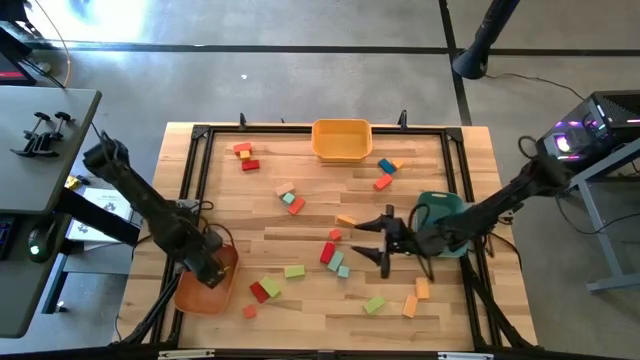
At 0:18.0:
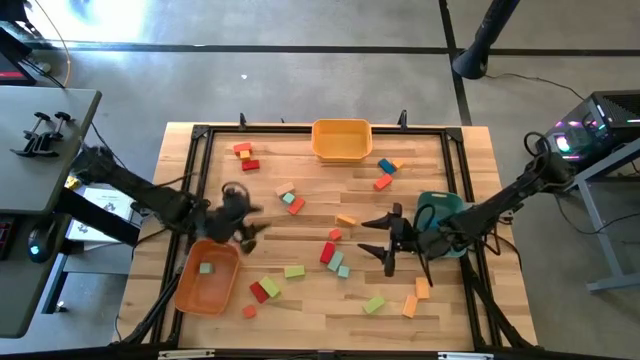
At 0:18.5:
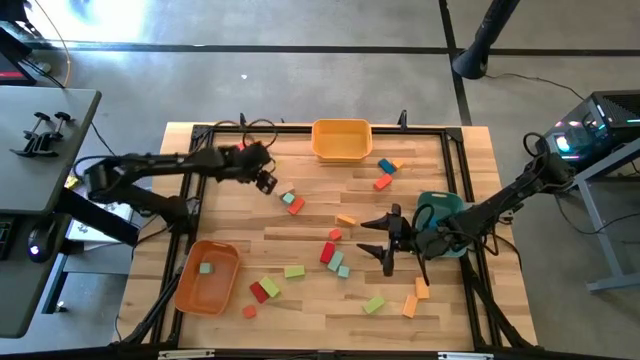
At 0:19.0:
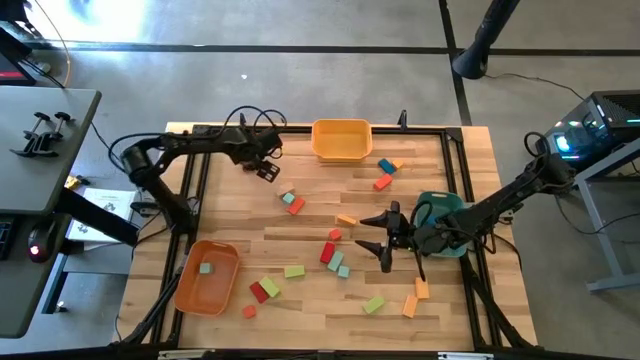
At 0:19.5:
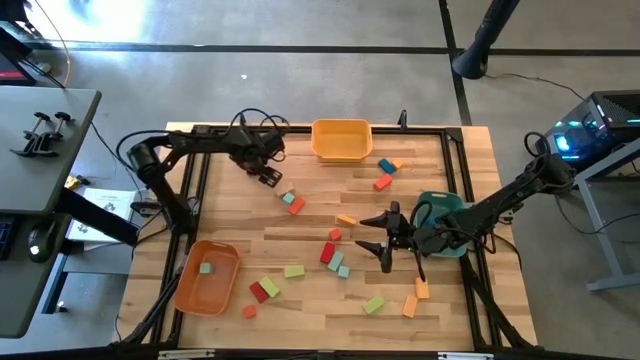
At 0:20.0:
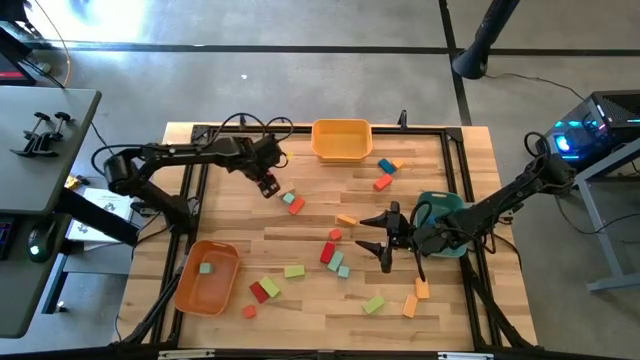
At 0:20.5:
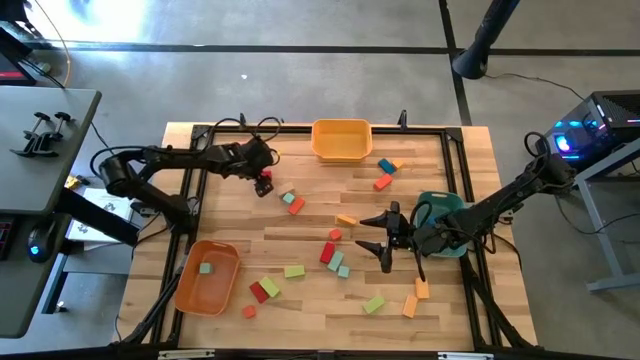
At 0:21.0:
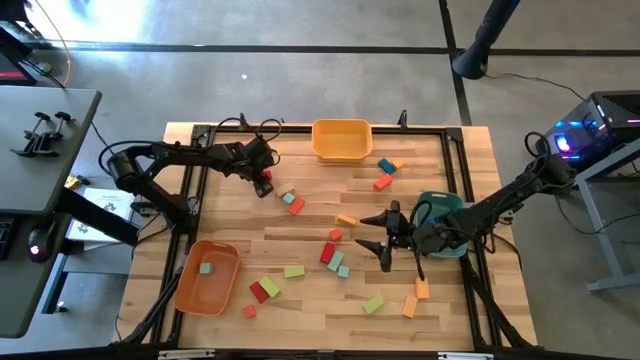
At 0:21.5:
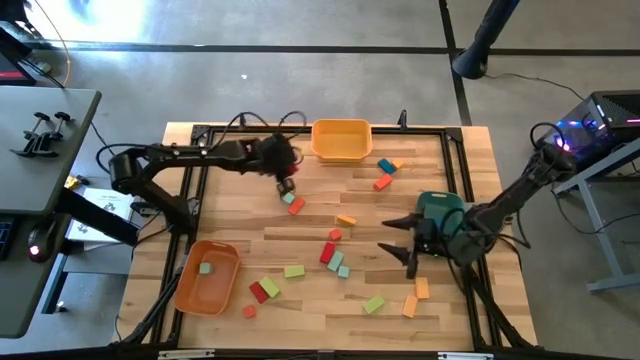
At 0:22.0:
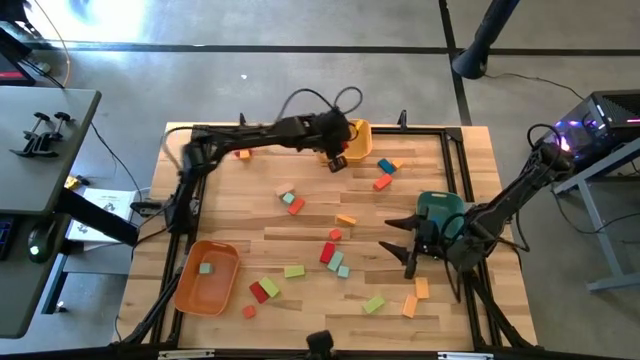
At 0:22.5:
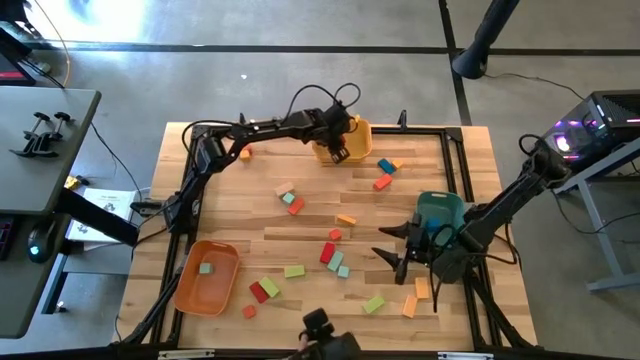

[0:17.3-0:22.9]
Task: Sort blocks by size
Put the red thin rectangular block into the yellow bin

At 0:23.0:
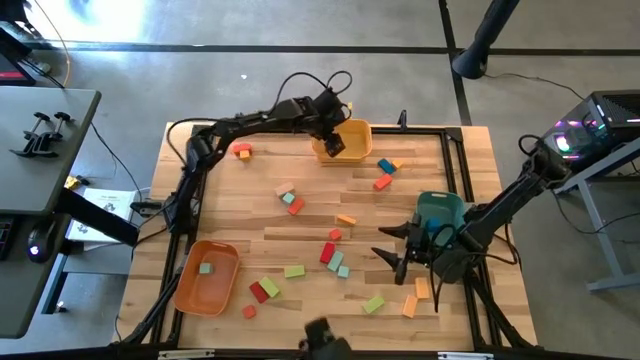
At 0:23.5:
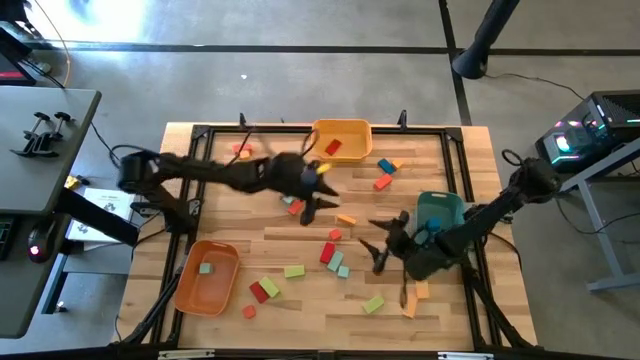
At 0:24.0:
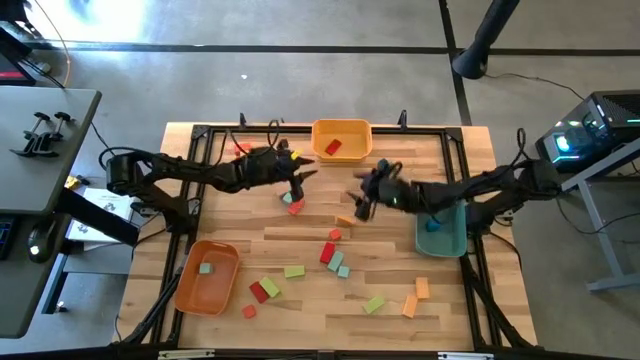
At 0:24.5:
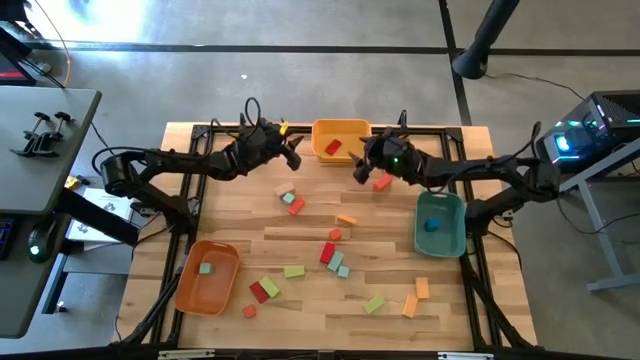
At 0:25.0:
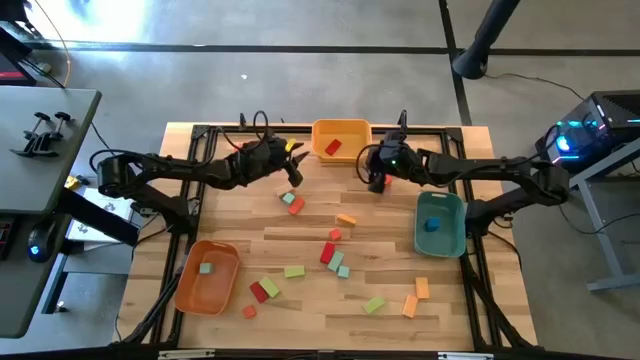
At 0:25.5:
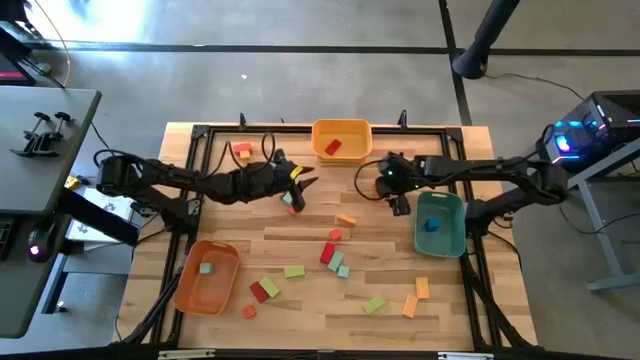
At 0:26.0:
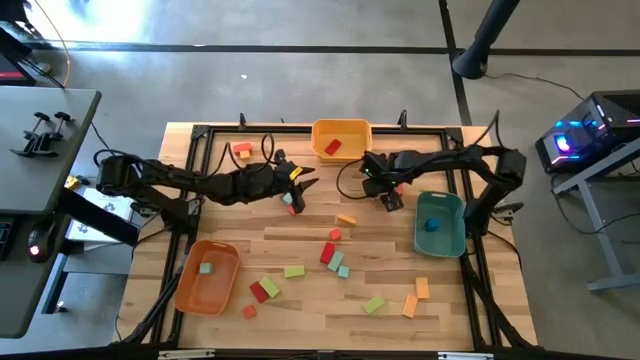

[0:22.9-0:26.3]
Put the thick orange rectangular block into the blue bin

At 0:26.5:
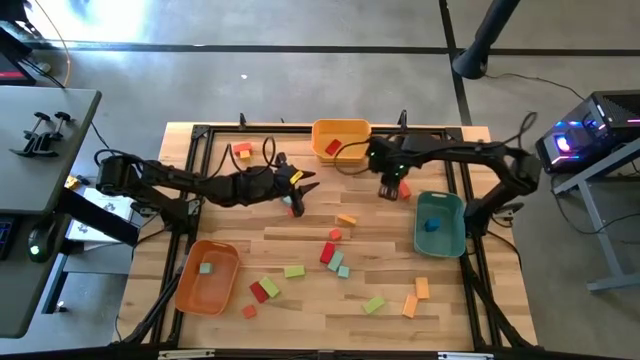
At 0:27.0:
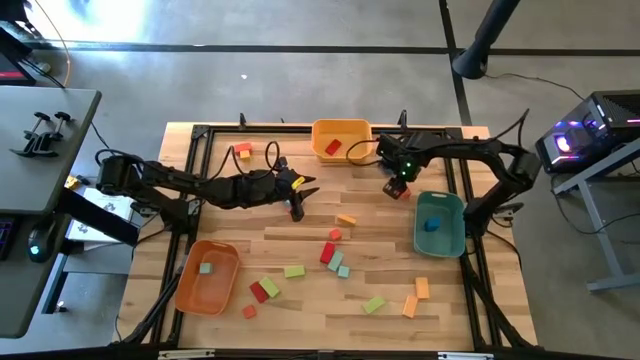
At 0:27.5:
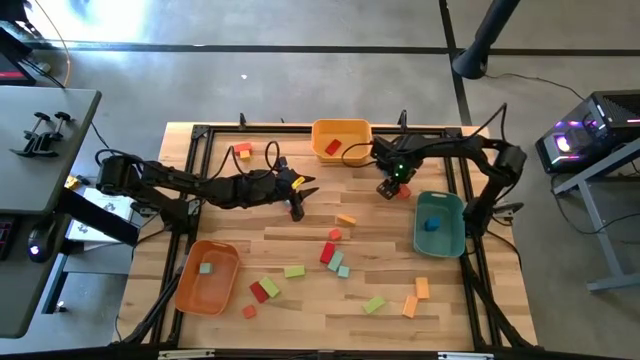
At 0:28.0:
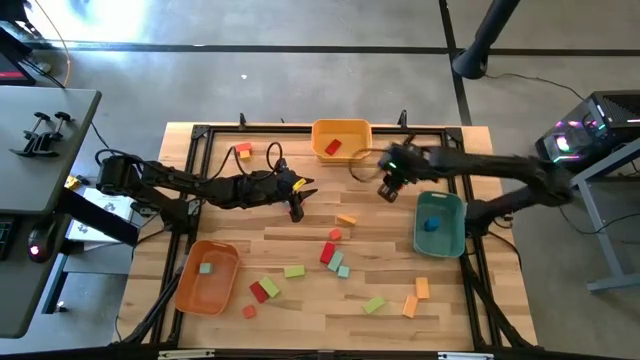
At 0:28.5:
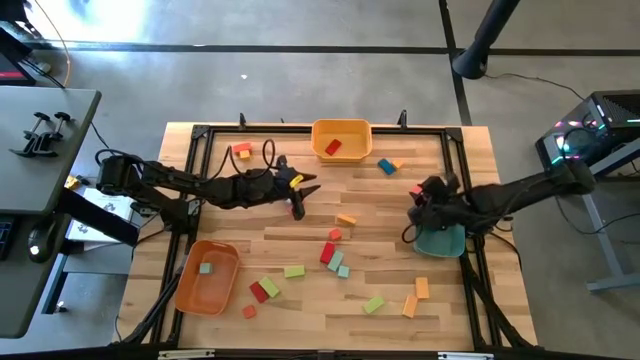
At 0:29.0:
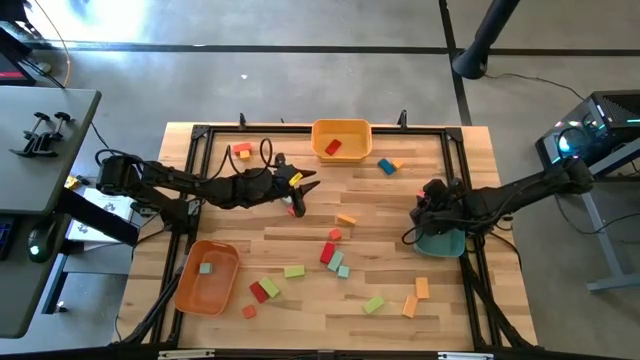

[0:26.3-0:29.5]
Put the thick orange rectangular block into the blue bin

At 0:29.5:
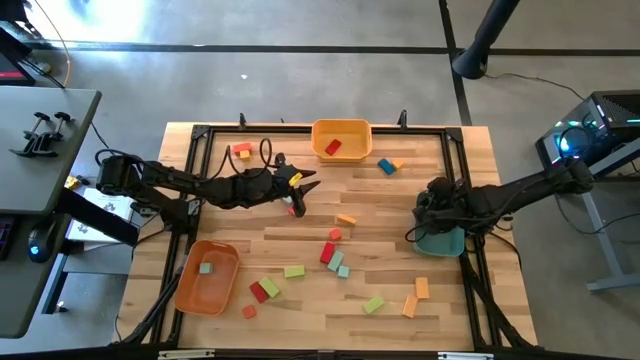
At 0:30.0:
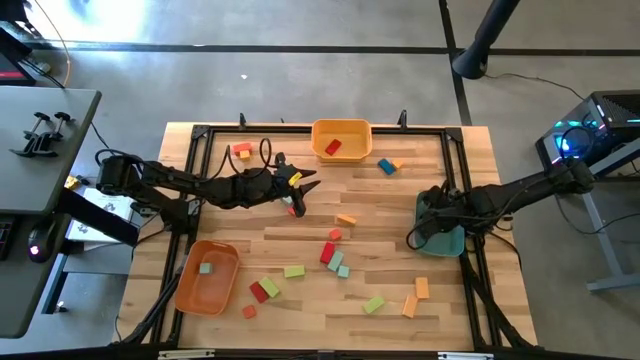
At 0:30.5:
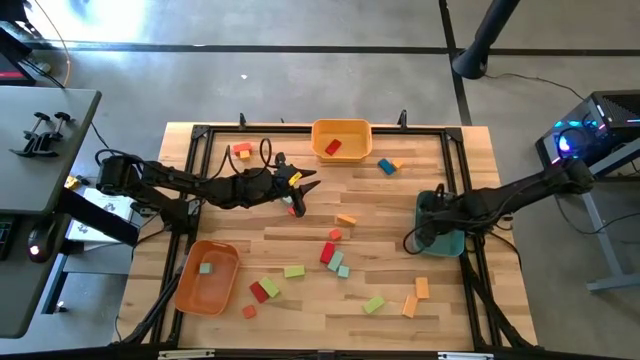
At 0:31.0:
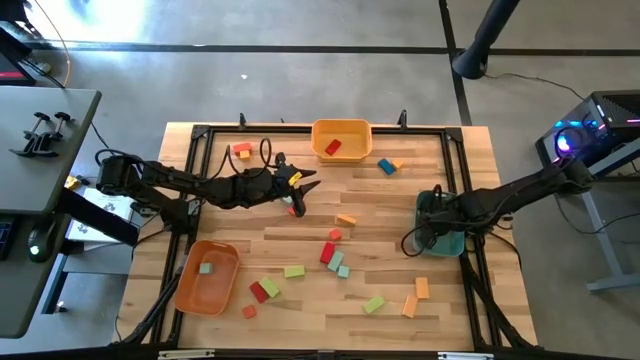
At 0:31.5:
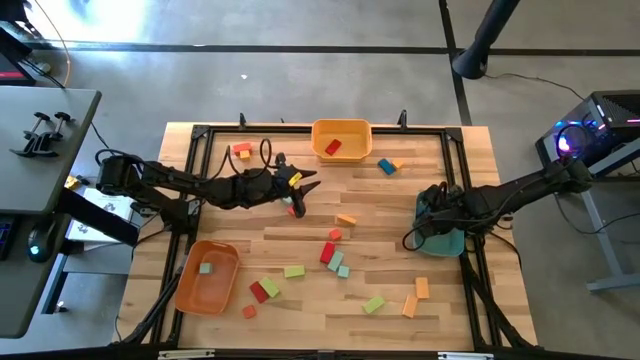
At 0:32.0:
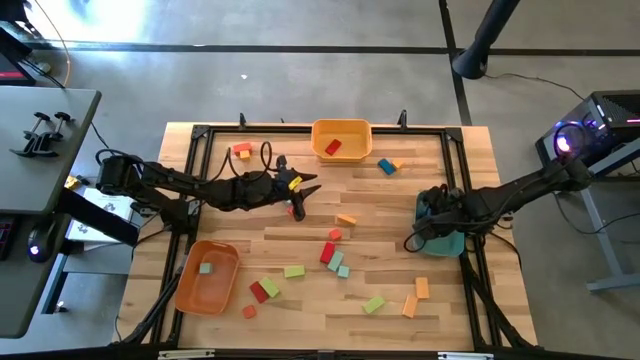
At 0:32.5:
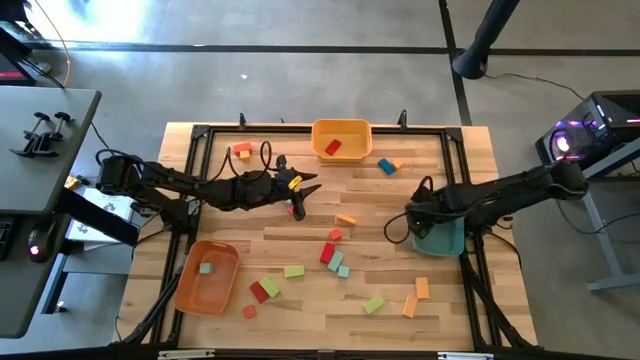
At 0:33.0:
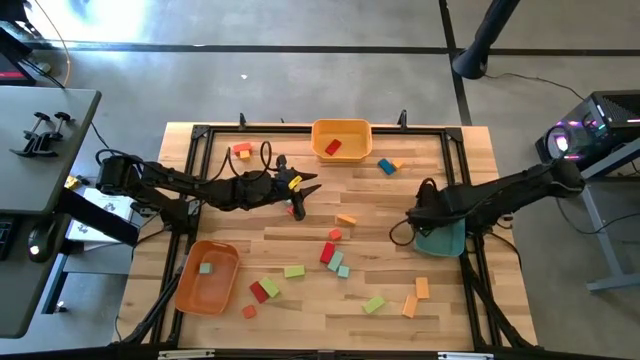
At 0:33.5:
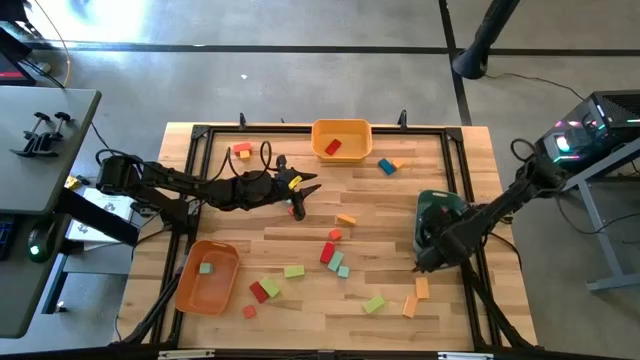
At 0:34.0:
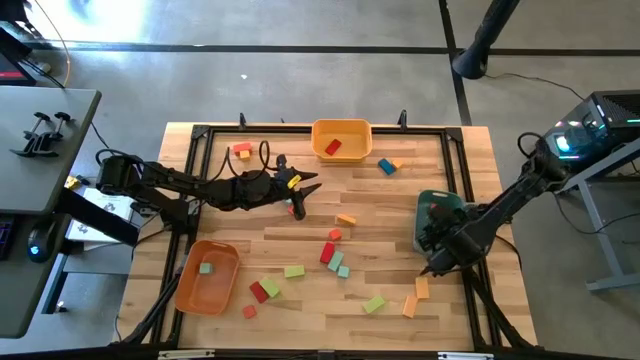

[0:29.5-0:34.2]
Adjust the thick rectangular blue block in the blue bin

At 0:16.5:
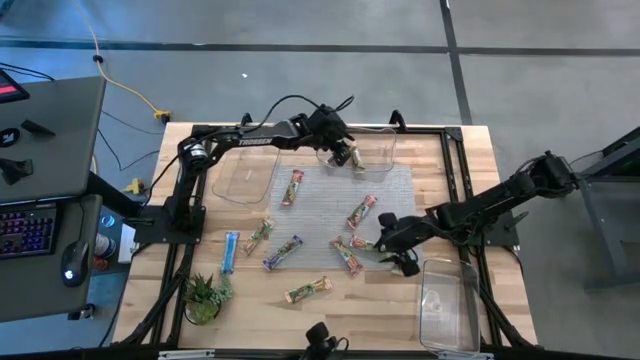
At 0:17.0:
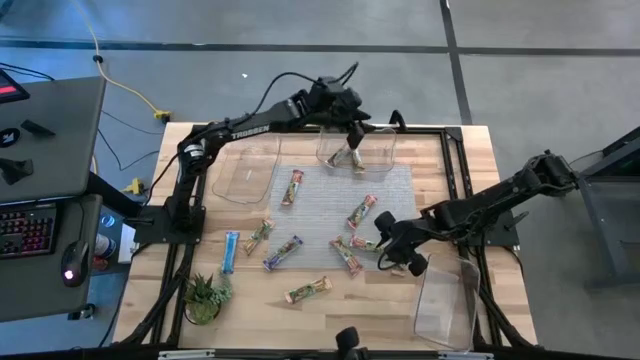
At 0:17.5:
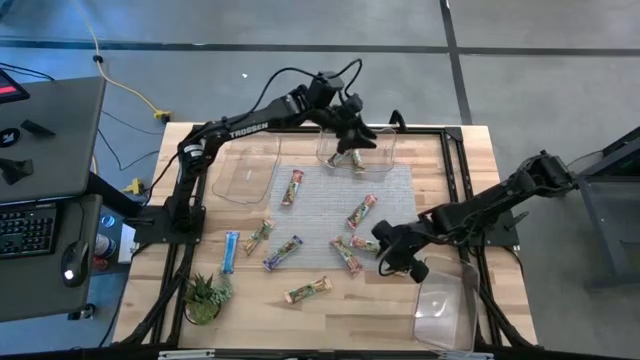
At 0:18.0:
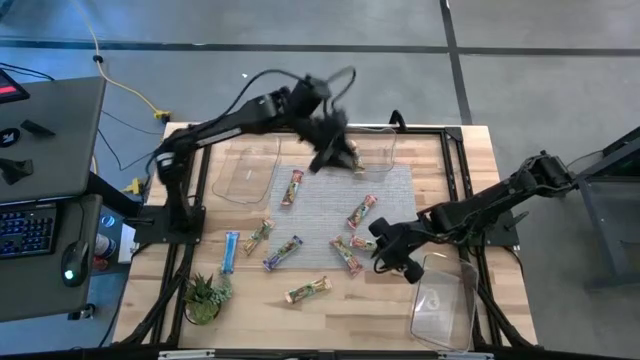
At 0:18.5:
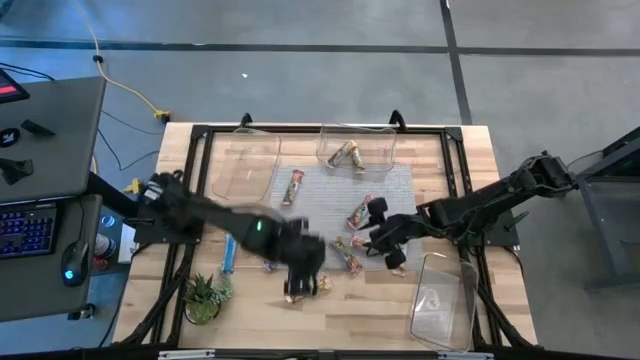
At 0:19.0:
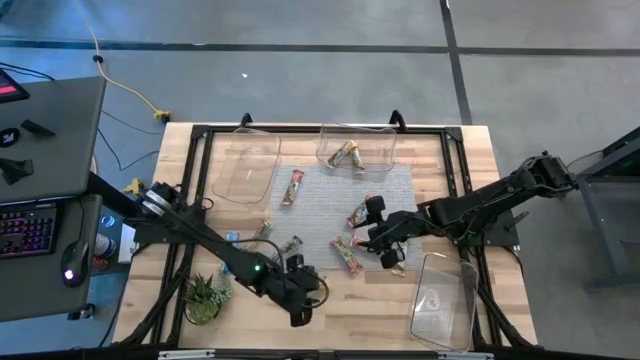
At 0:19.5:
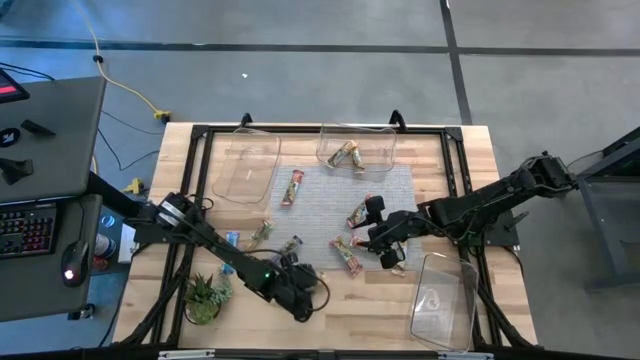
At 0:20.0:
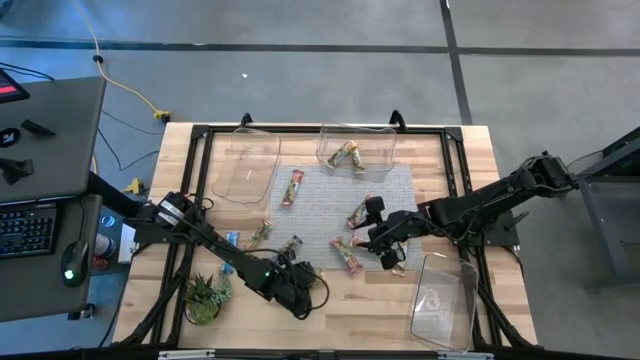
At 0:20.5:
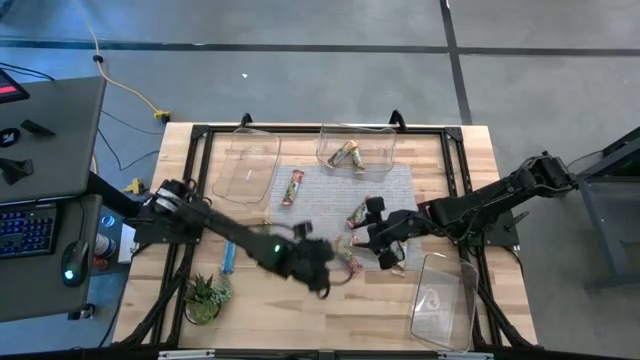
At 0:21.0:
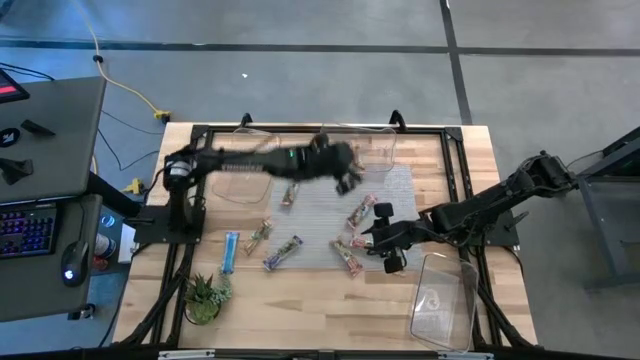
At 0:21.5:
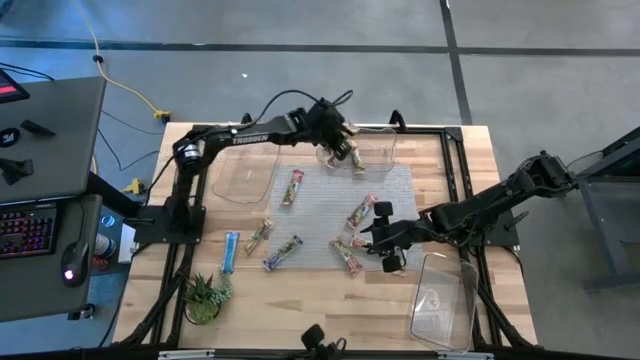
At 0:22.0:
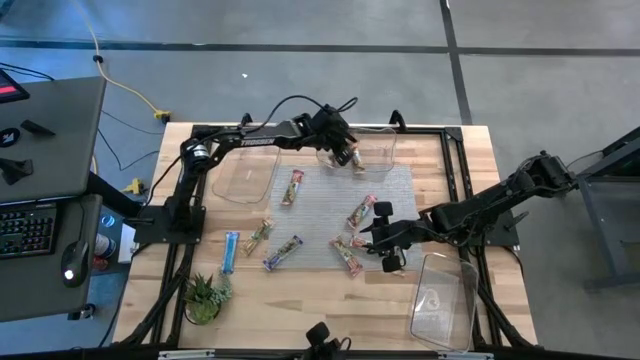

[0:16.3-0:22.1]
Task: Pick and place Granola Bars by type
Put the yellow granola bar into the top right transparent bin
